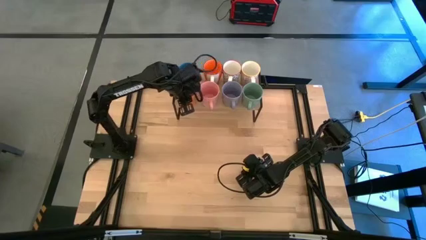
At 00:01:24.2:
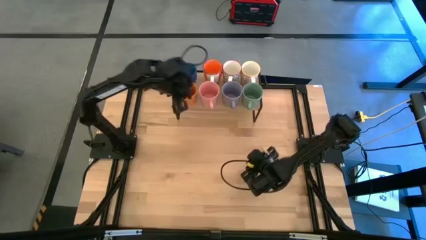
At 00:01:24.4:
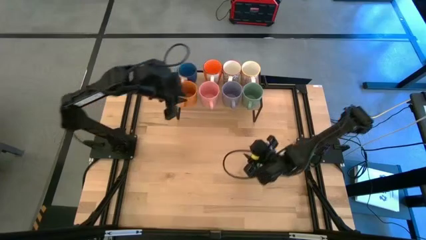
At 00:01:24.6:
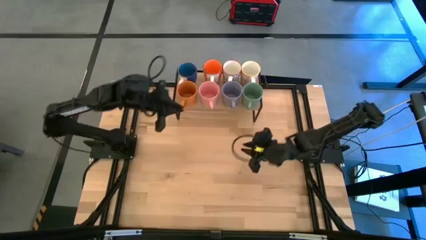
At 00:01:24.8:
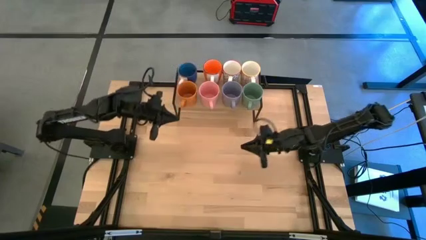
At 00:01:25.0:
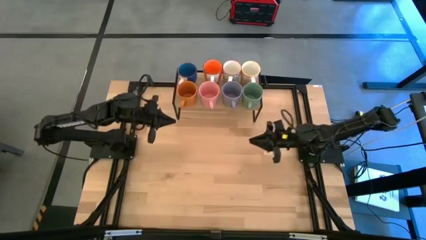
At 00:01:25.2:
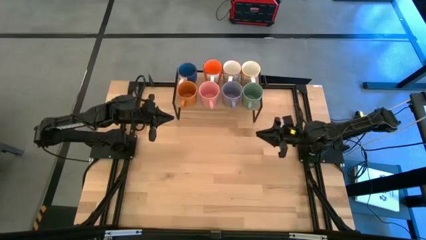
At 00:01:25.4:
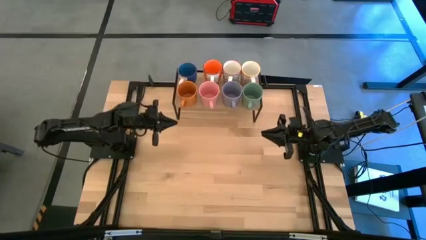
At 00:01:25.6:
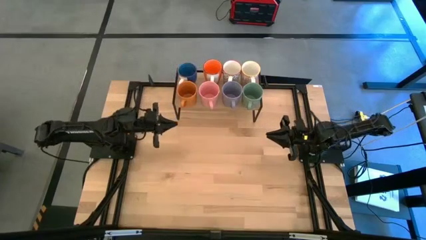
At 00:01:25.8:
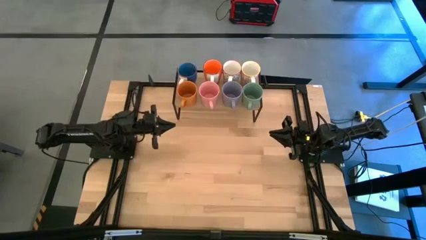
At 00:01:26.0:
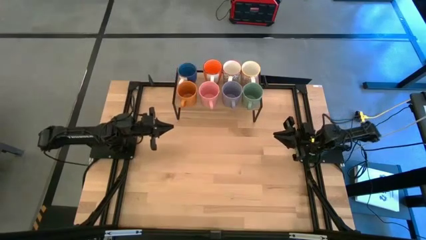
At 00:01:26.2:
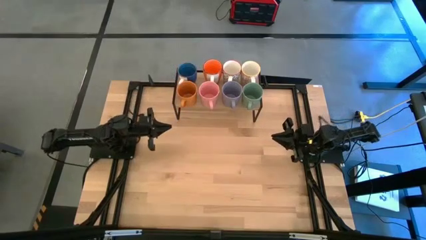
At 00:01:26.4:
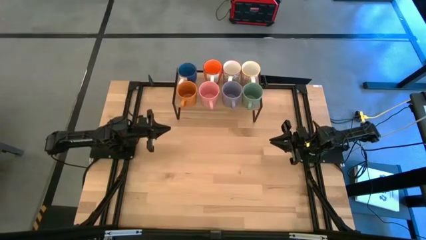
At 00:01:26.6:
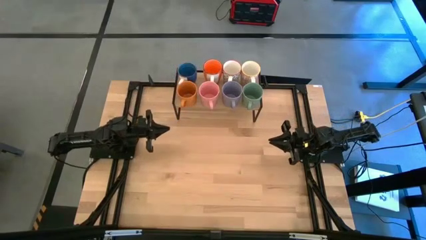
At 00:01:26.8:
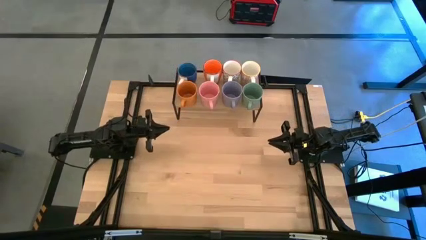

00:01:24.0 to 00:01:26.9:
Task: Place coffee mugs
Return to Home Position

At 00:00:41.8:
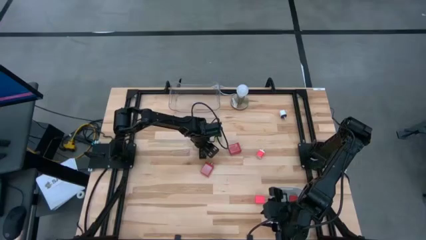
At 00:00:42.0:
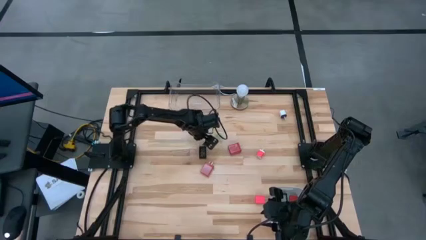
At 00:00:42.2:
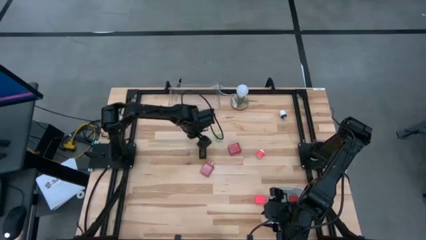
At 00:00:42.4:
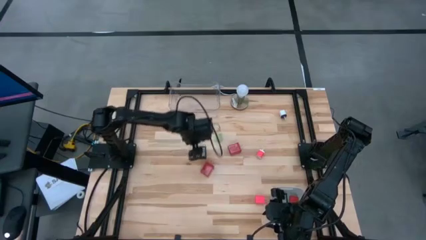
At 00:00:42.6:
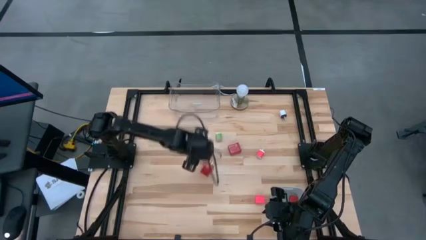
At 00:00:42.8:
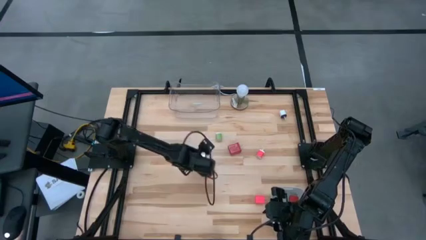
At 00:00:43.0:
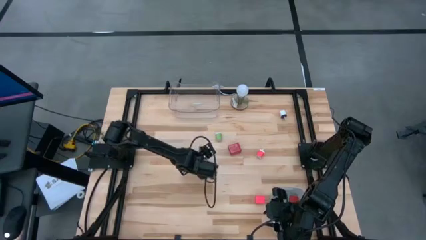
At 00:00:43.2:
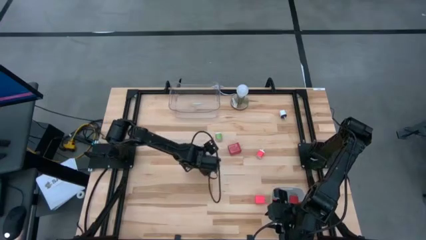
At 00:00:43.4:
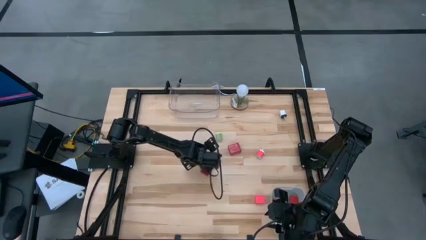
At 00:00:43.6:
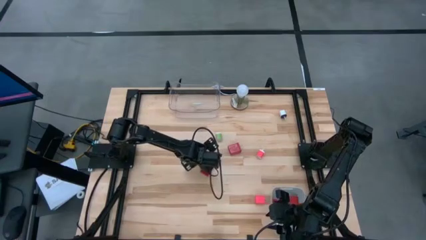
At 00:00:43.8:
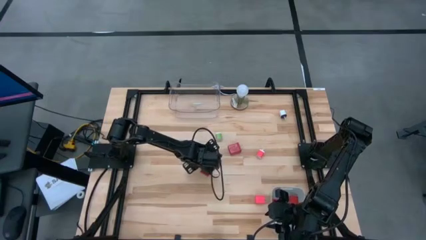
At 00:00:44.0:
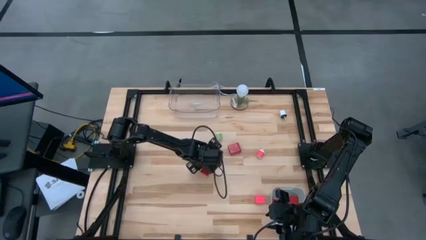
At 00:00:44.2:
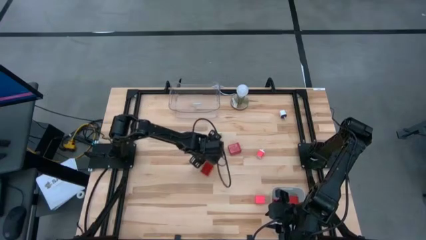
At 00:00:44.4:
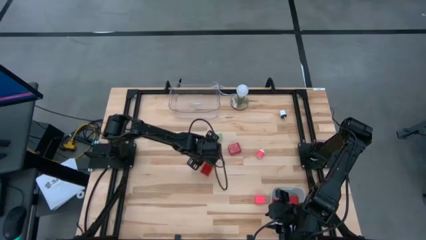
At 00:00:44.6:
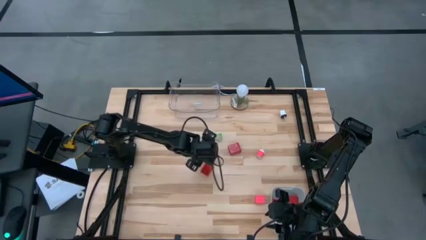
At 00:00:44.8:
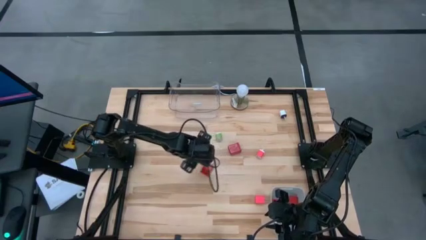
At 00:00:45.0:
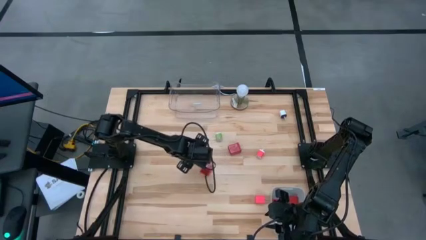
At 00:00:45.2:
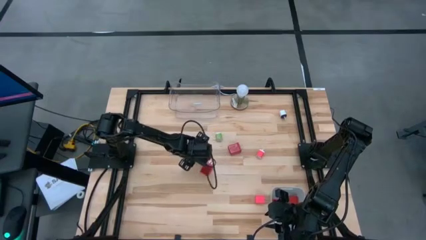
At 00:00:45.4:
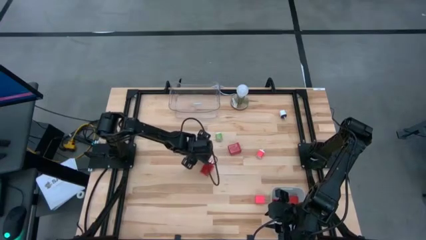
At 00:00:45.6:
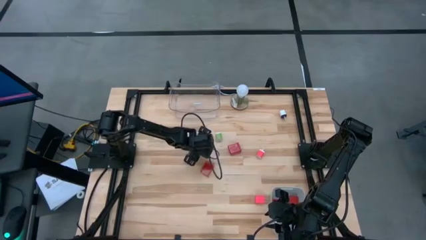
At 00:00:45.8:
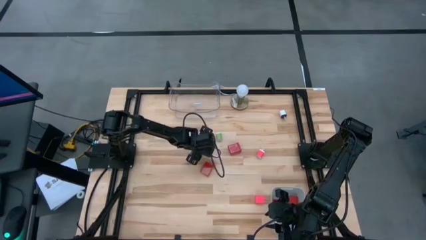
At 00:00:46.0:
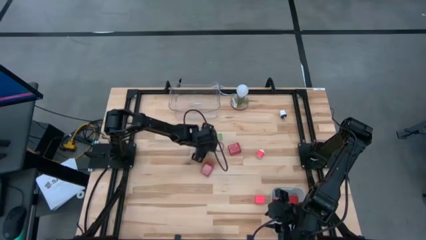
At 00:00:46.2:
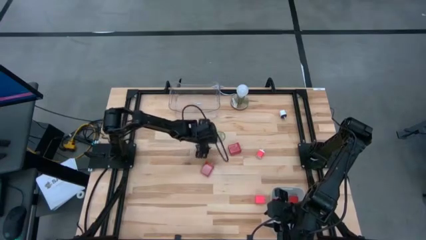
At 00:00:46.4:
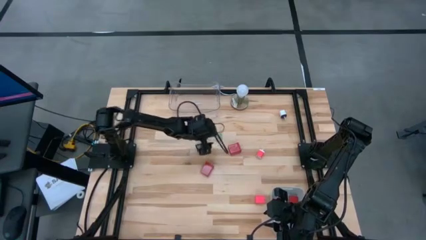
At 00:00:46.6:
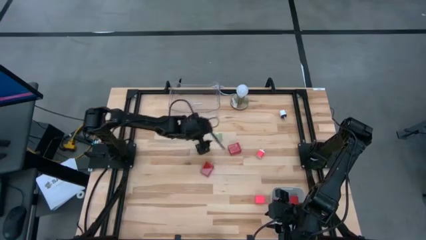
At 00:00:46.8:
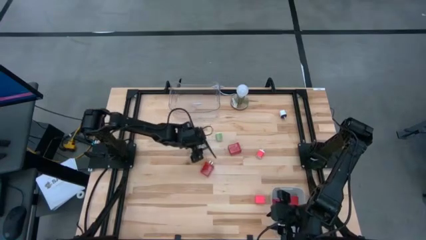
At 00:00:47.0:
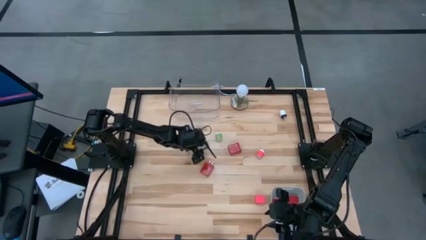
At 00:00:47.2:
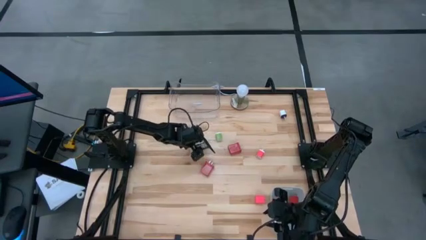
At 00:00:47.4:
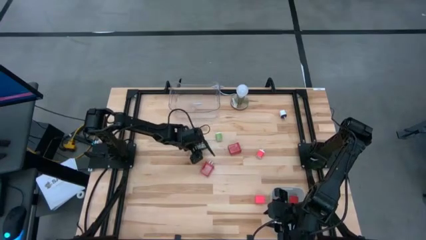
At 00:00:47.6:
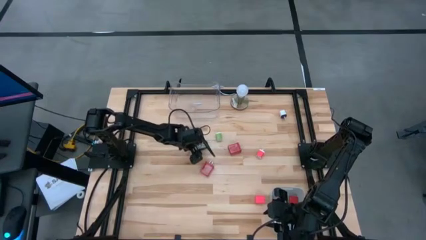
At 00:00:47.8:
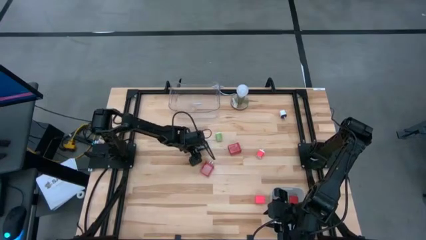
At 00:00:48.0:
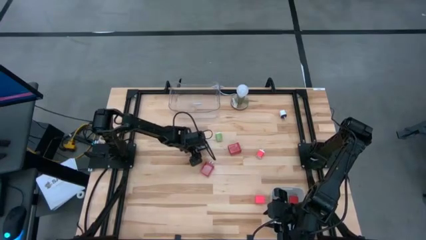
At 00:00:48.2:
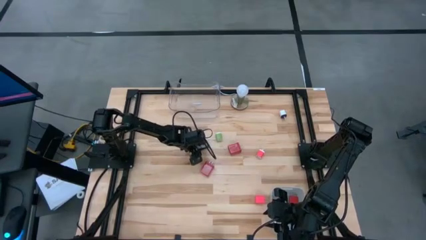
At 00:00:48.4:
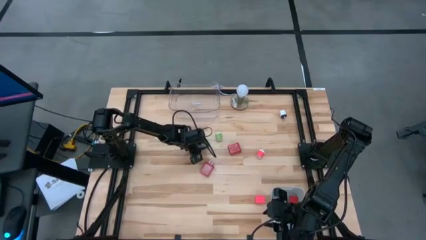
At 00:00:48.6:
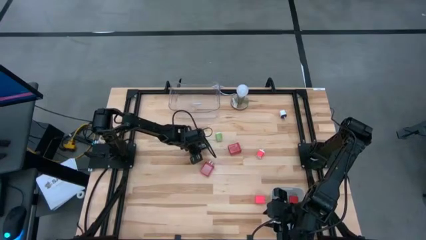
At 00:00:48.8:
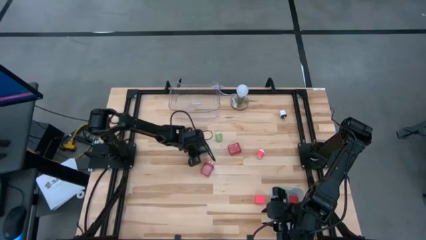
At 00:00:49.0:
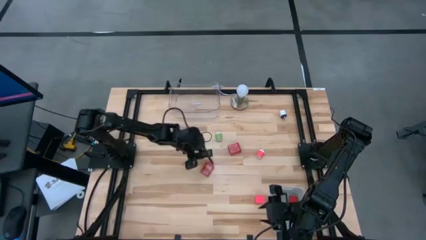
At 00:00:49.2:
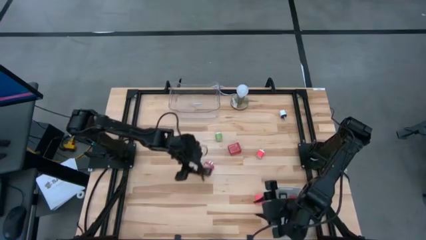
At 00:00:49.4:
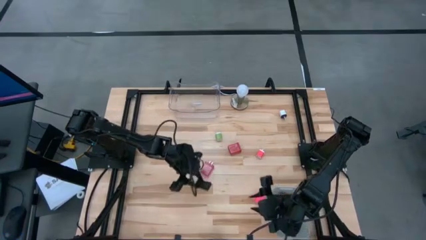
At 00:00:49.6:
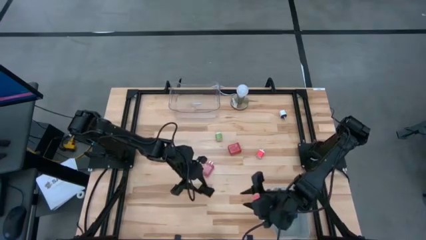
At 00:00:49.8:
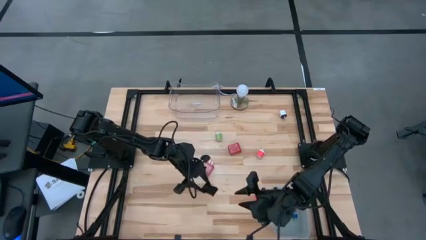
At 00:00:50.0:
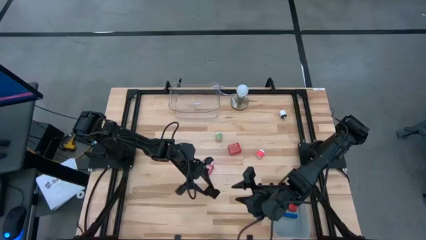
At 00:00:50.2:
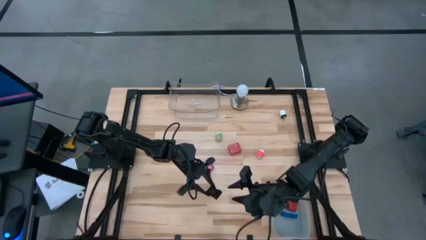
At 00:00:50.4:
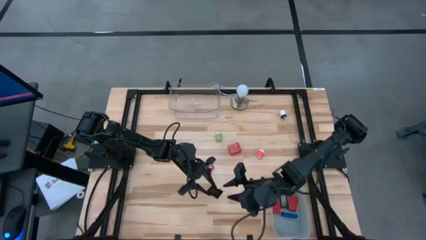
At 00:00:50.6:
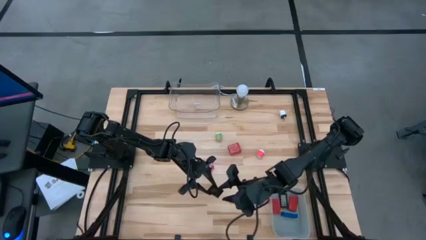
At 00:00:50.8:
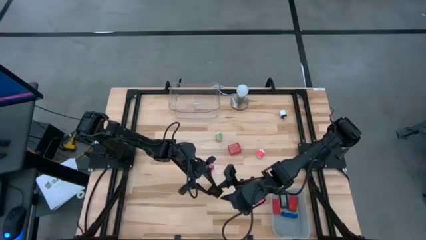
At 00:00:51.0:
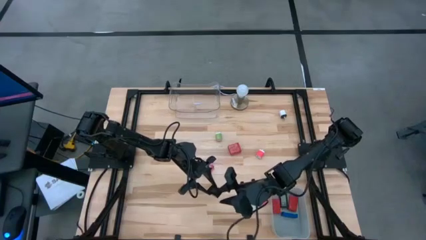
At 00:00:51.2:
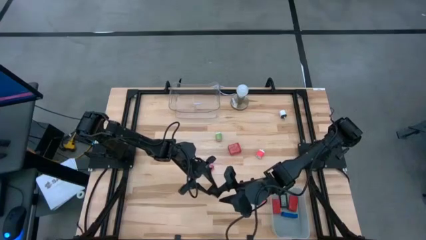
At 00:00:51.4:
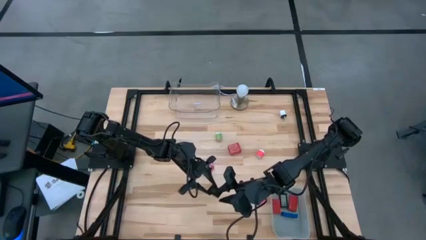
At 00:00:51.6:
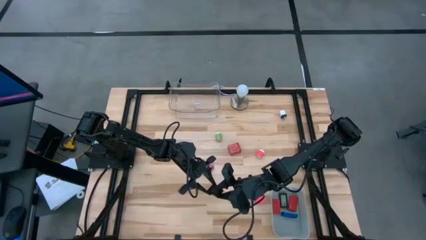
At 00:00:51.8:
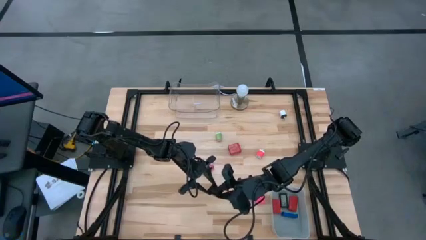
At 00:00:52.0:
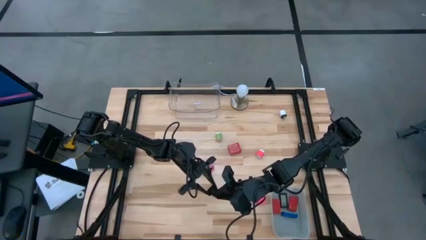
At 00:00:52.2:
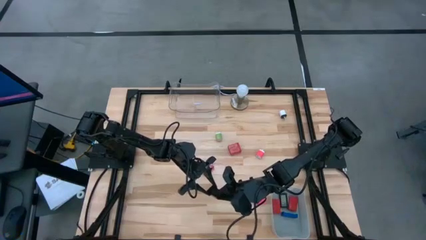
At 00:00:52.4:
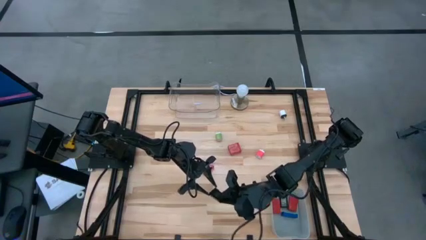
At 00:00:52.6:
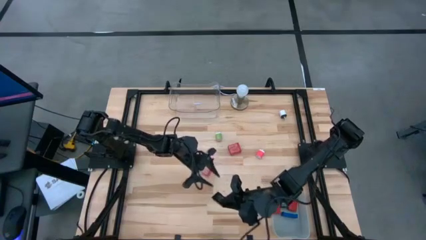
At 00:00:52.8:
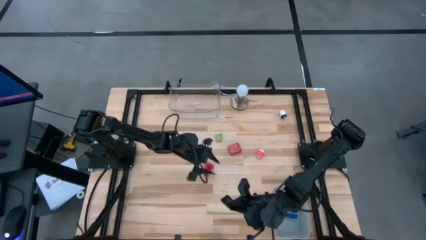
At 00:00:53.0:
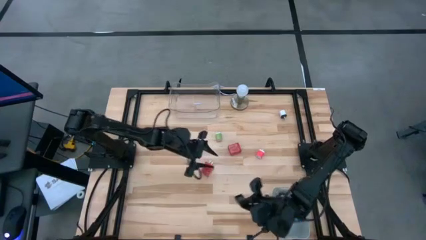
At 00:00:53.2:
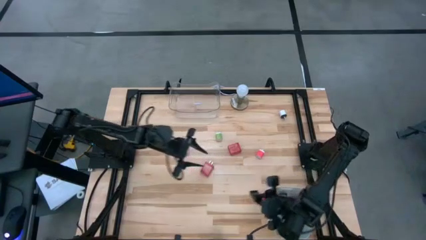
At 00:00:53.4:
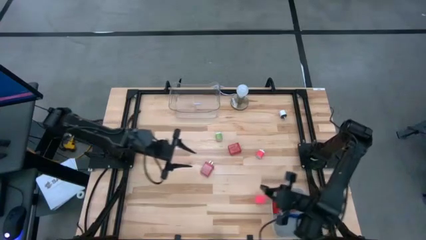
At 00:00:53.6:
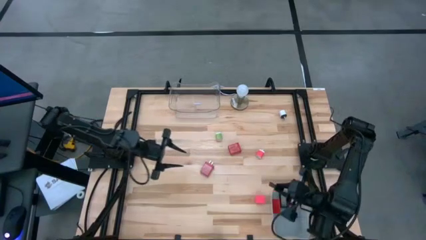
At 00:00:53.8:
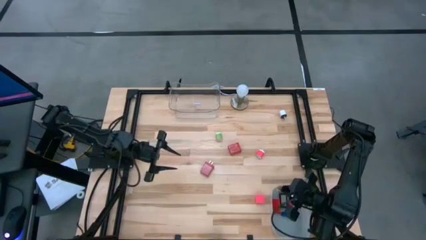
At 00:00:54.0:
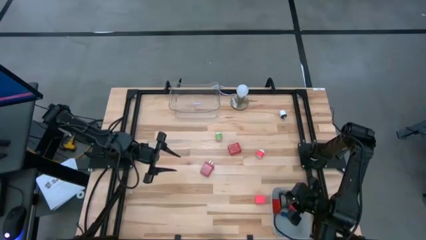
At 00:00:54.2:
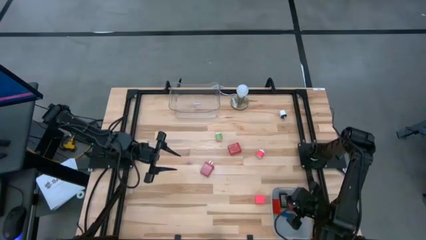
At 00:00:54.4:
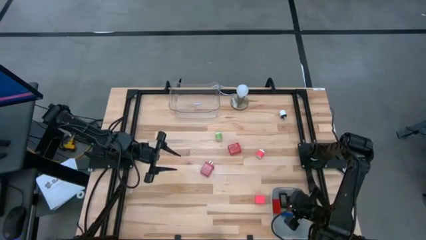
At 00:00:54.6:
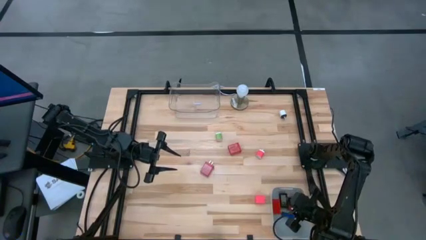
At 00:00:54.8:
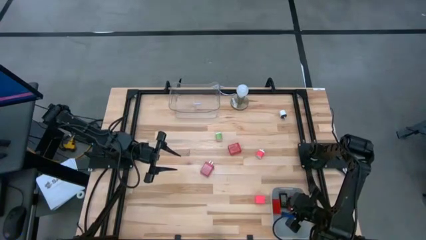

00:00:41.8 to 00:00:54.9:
Task: Pick & Place Office items
Put the black digital clock into the gray bin
